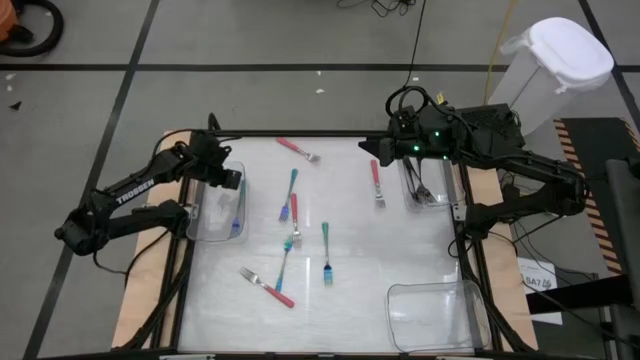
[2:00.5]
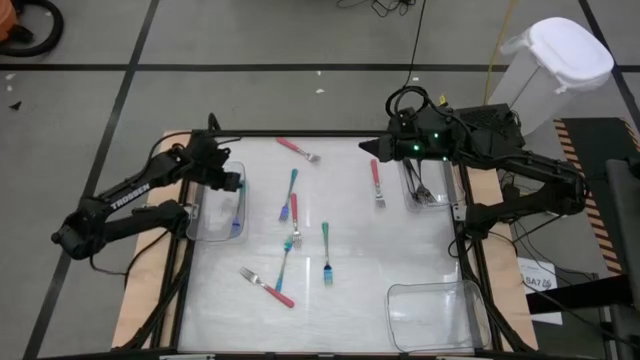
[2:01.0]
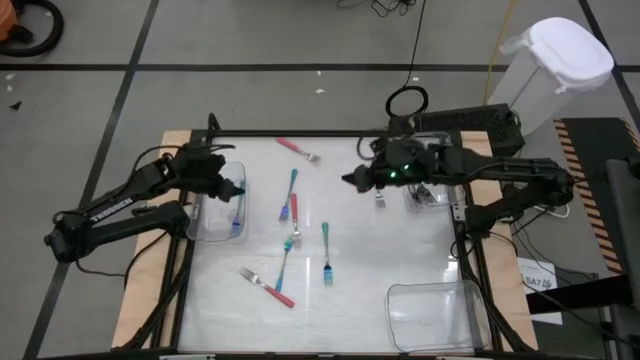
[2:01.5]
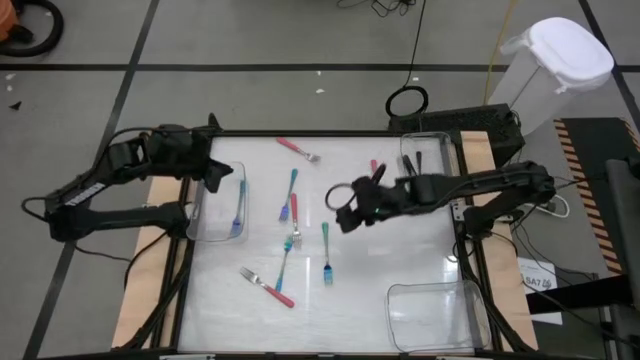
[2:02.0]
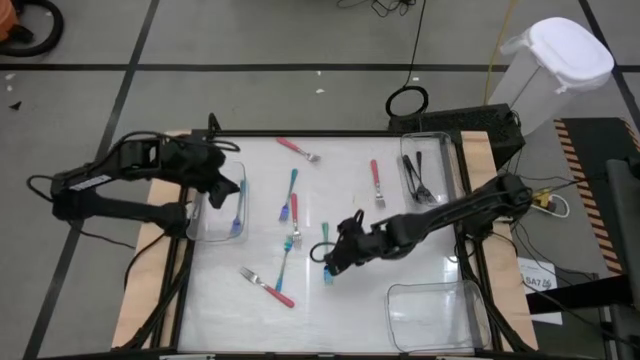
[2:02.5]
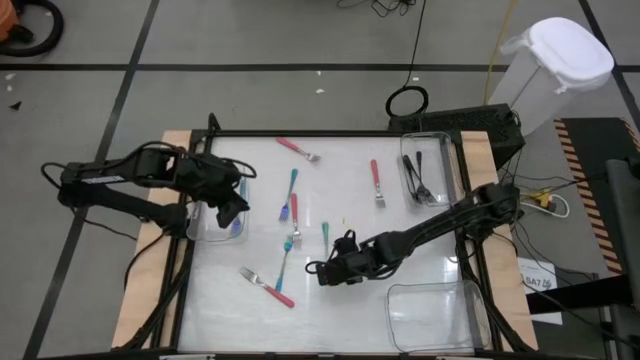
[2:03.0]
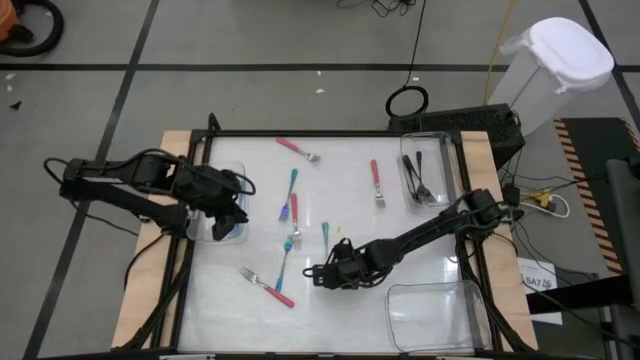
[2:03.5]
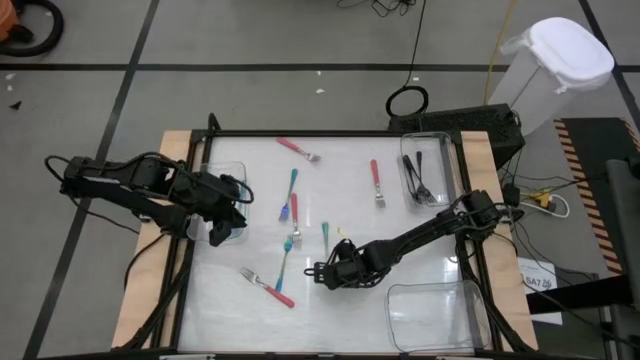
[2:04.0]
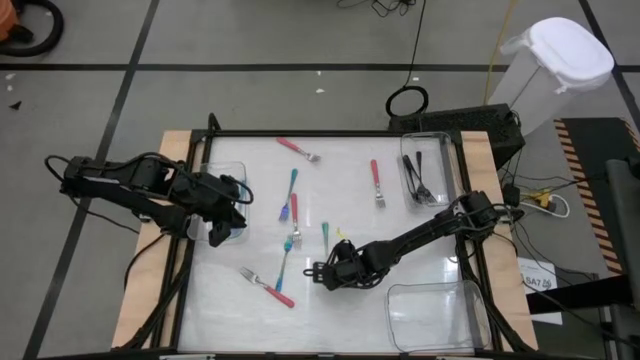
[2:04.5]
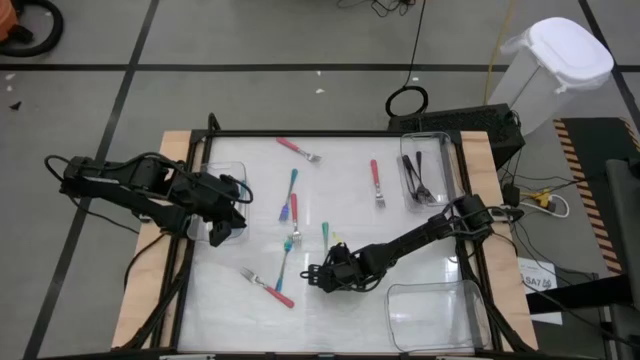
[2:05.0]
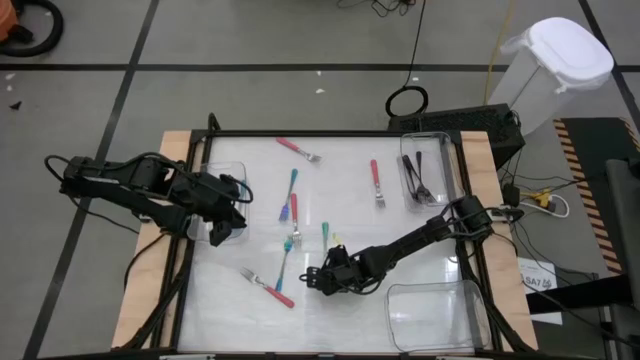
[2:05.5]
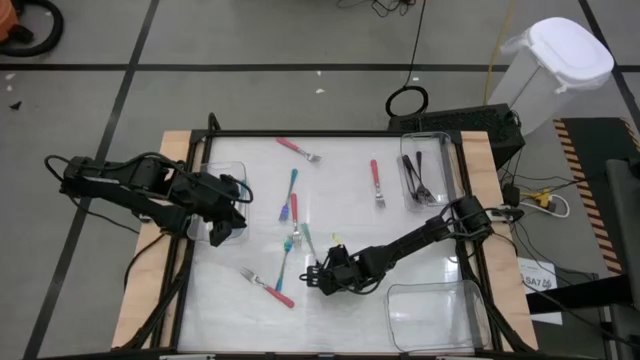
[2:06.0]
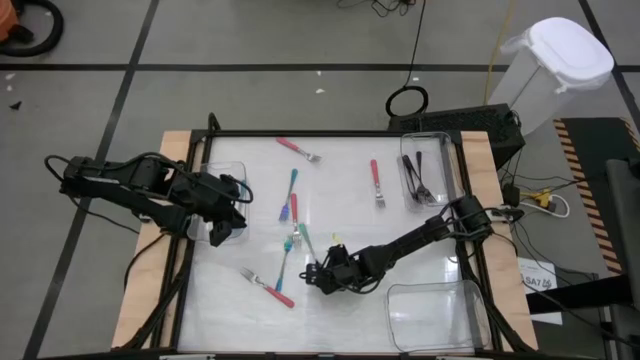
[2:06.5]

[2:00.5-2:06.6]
Task: Sort silverware by color (type)
Put the blue fork into the left transparent bin

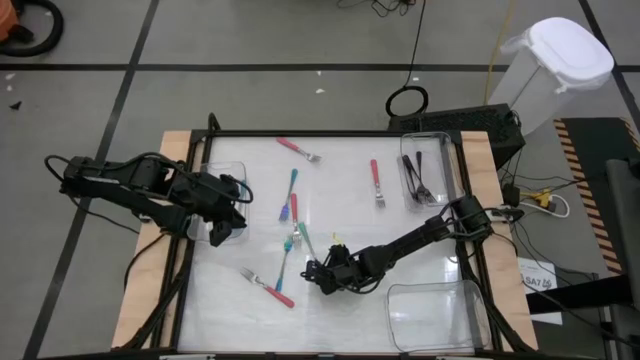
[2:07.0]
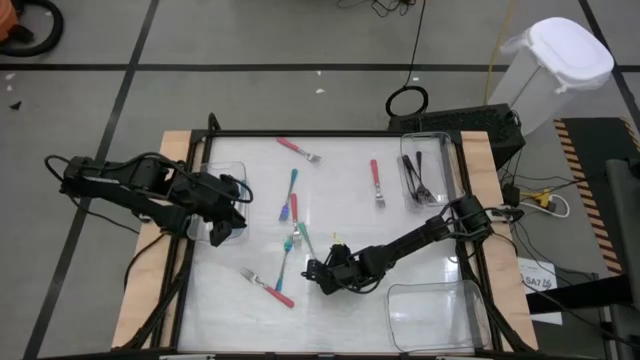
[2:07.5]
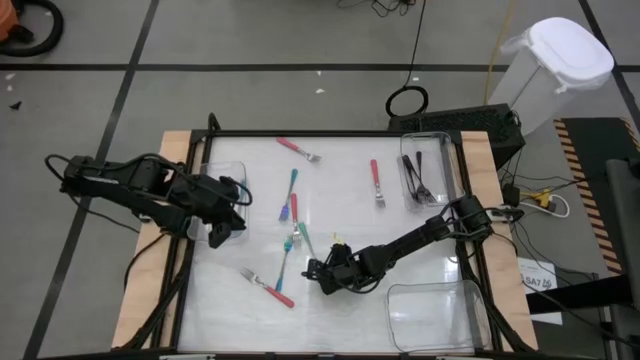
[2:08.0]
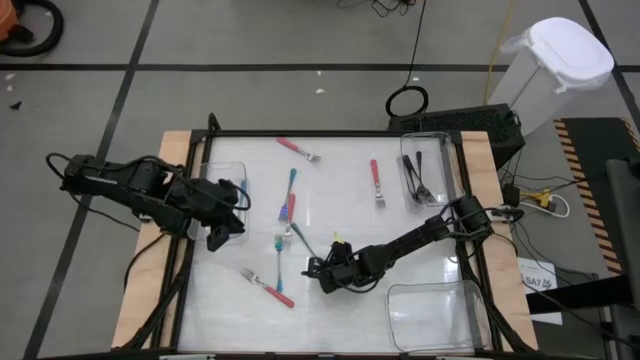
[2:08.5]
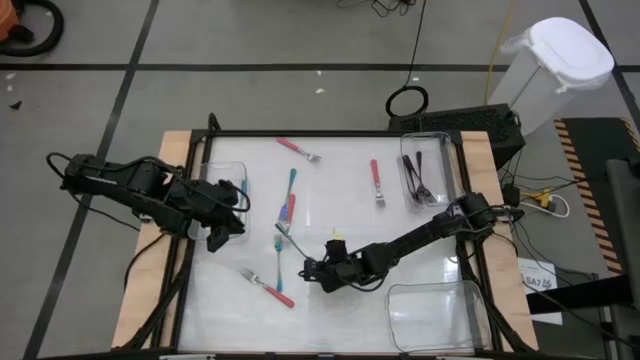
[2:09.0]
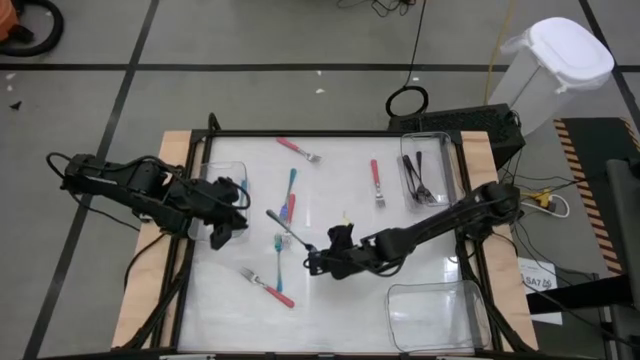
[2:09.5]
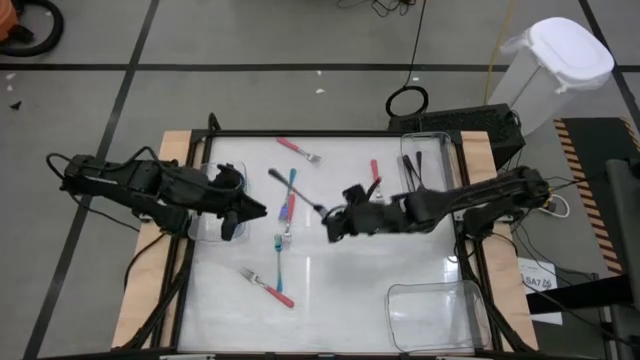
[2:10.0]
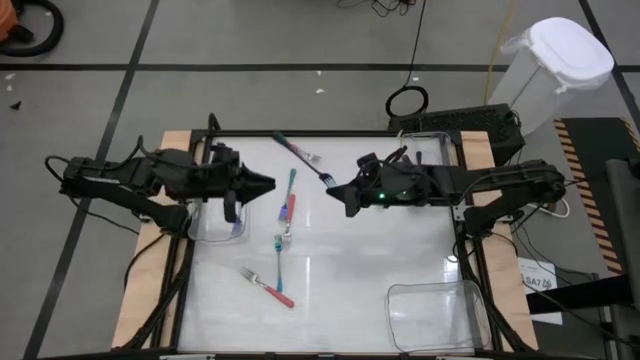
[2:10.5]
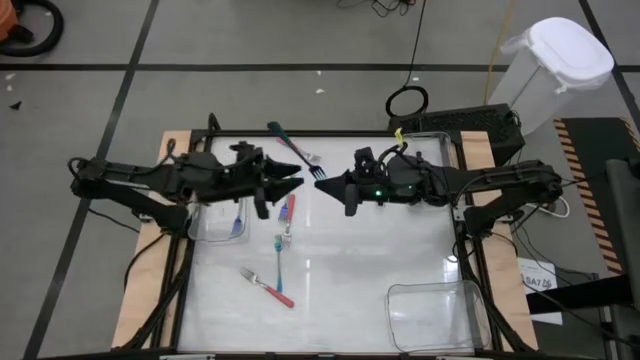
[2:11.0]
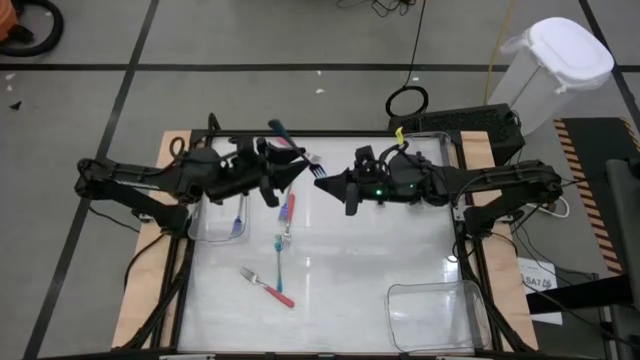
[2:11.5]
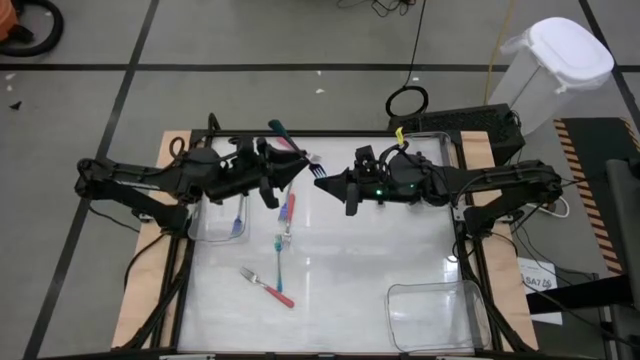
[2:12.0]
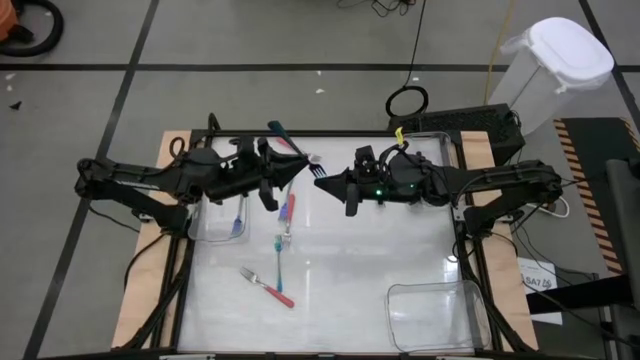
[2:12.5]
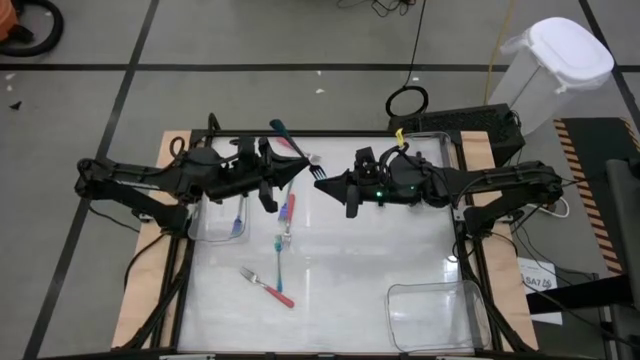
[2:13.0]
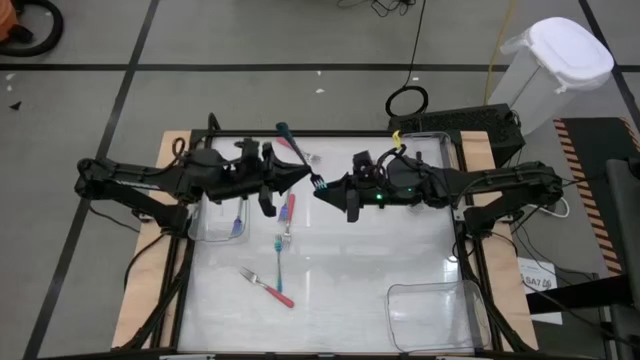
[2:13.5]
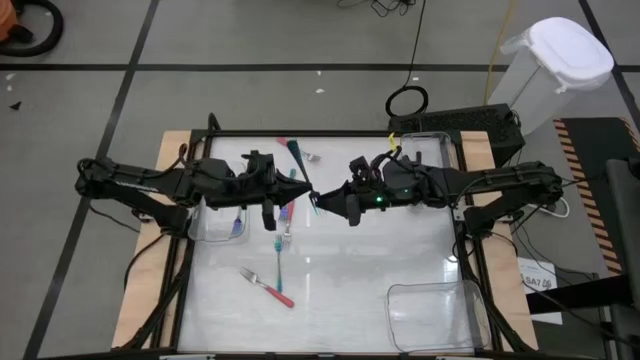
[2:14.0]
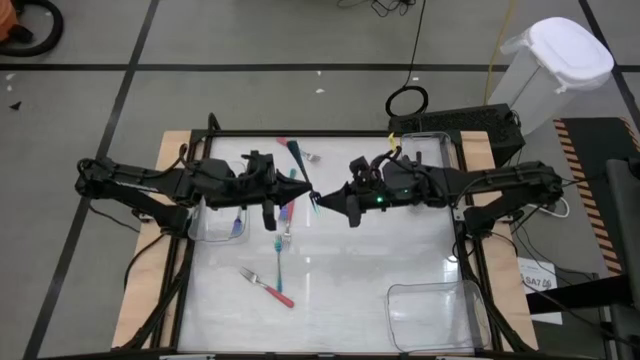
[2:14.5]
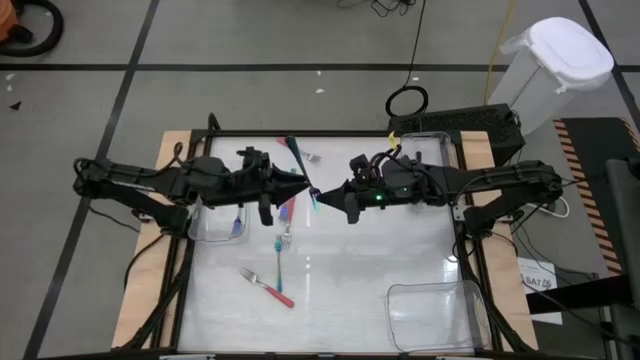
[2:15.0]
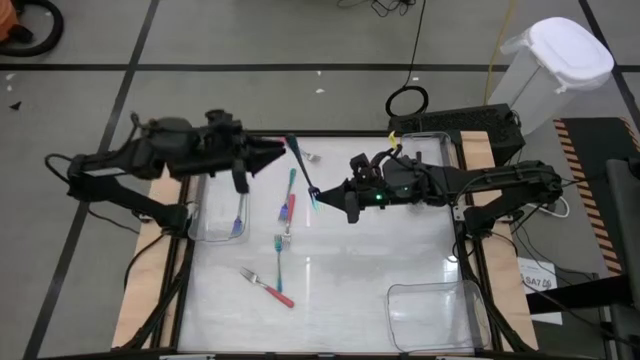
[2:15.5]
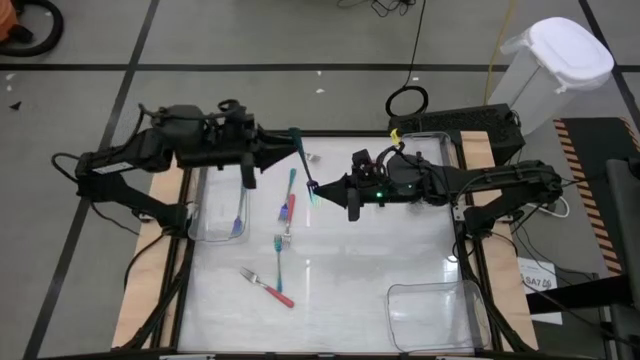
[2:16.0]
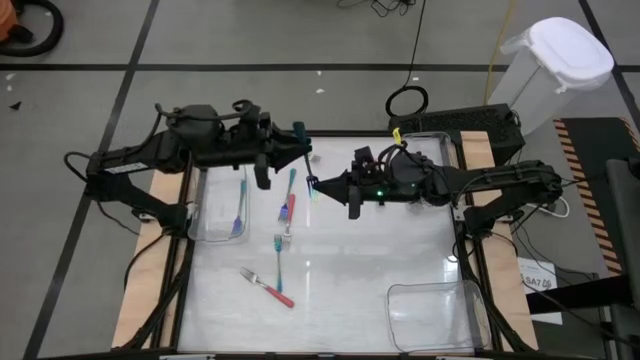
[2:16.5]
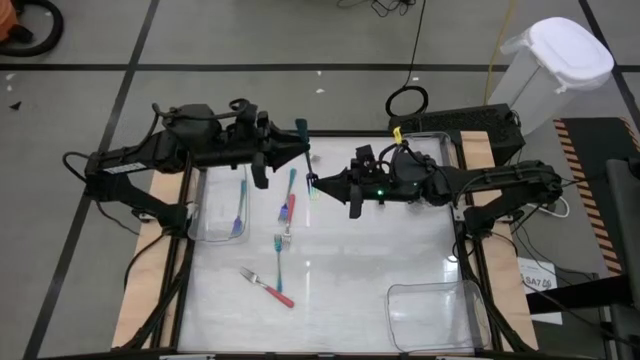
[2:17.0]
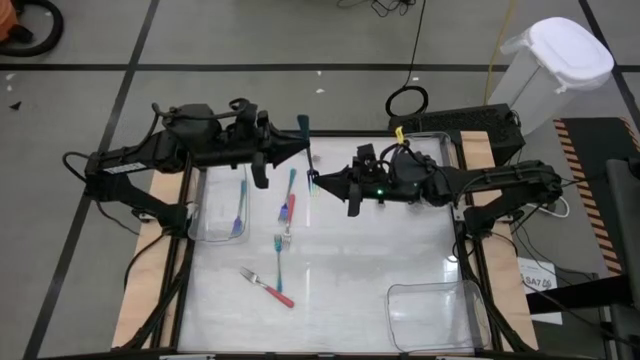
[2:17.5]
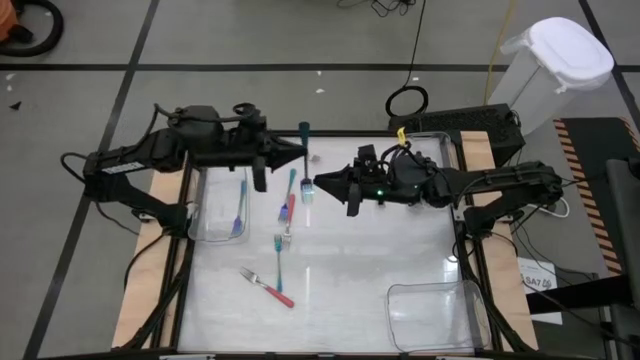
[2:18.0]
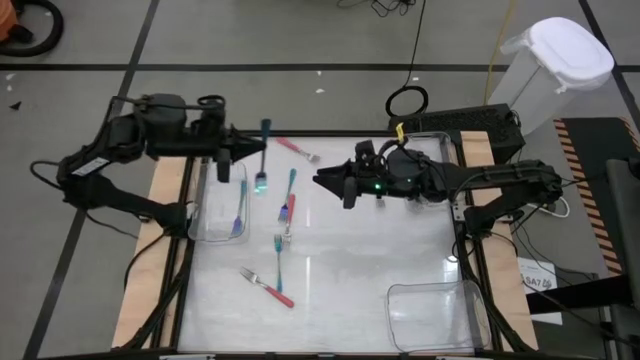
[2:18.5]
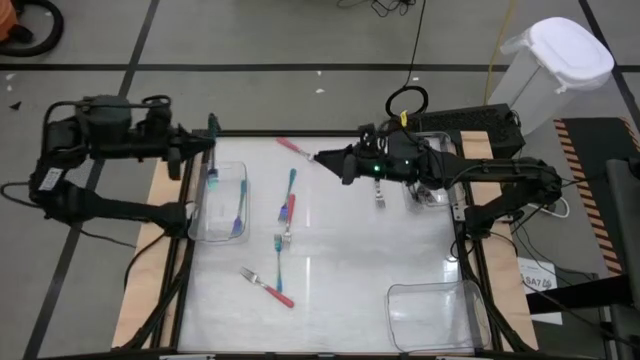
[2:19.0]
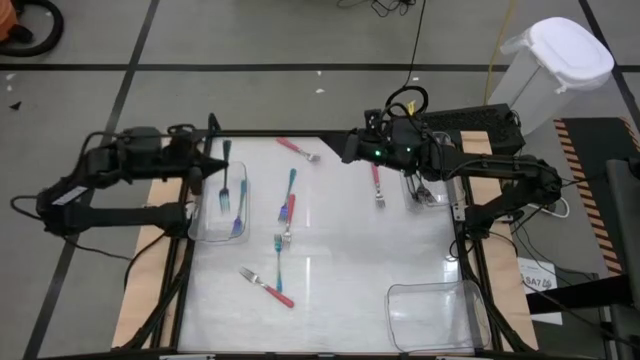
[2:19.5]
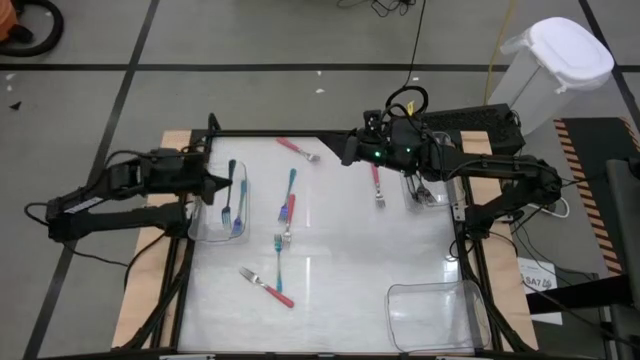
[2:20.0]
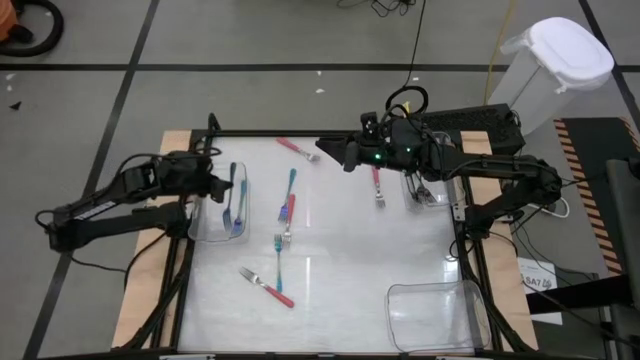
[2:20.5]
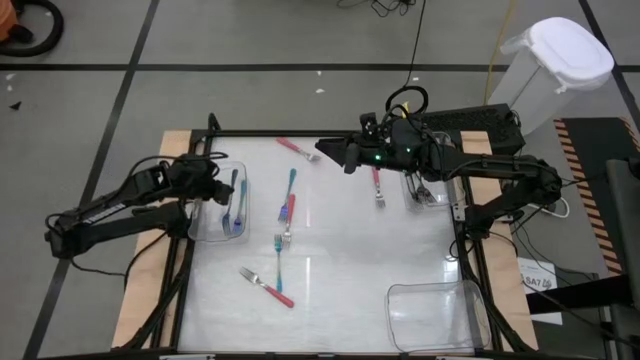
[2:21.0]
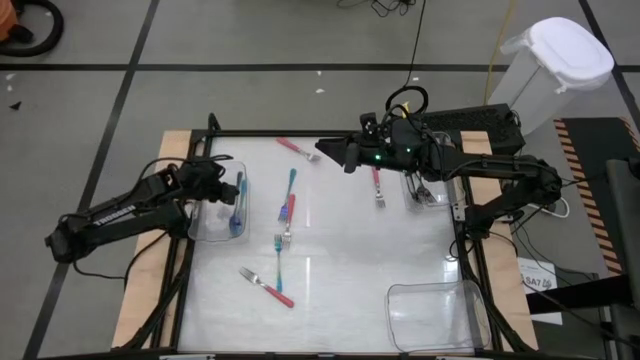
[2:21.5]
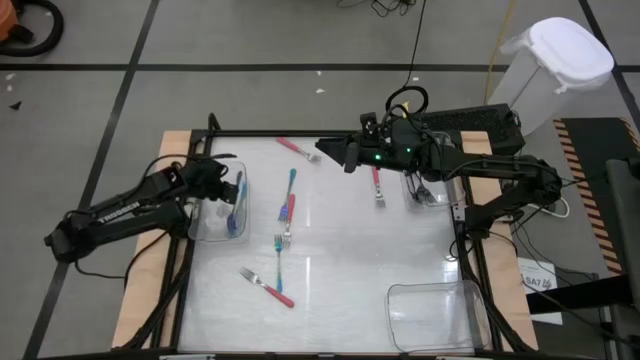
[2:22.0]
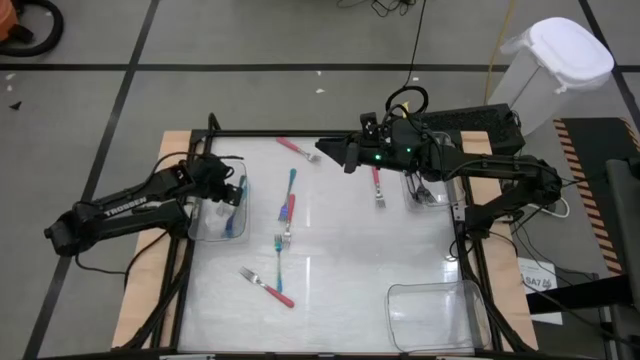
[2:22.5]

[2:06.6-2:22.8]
Put the blue fork into the left transparent bin
